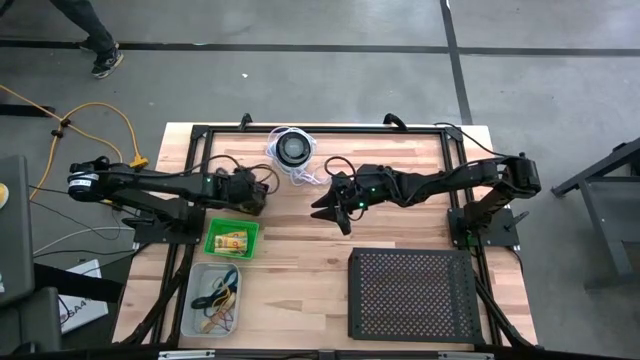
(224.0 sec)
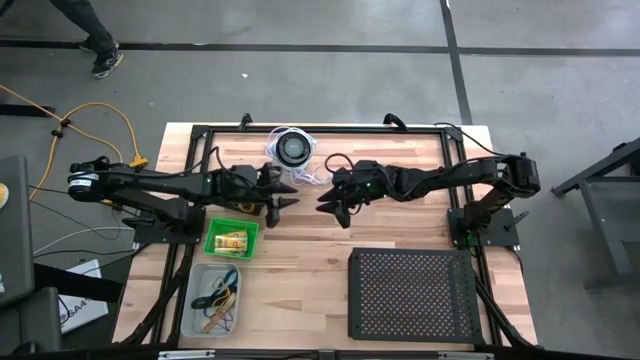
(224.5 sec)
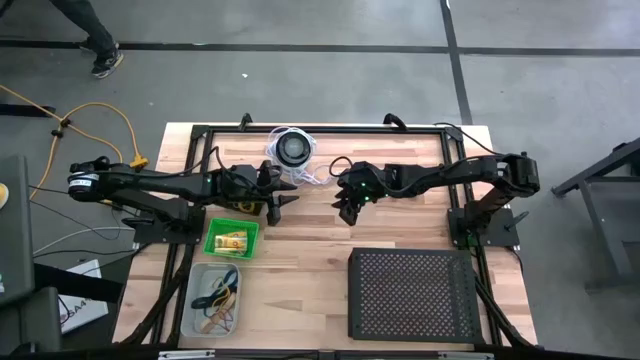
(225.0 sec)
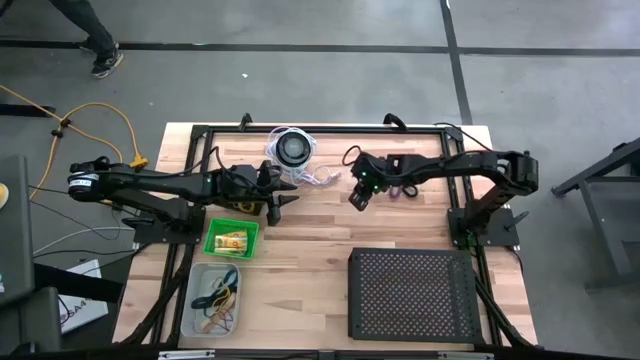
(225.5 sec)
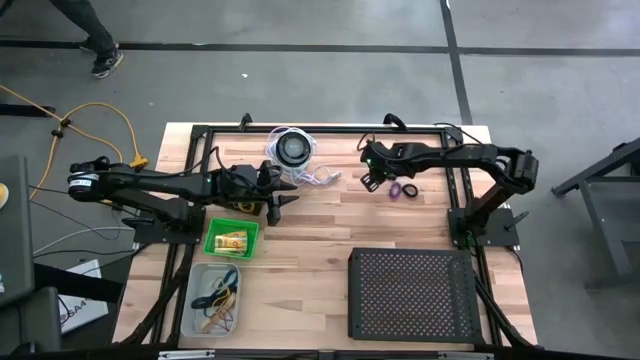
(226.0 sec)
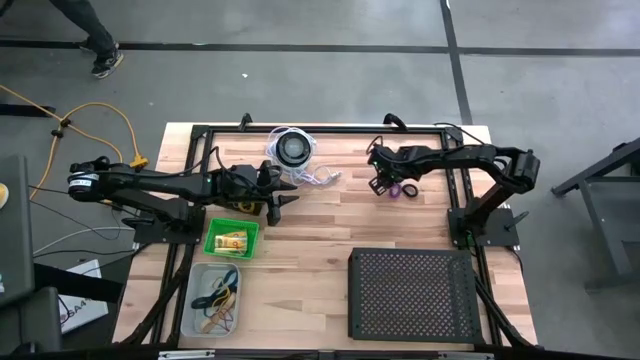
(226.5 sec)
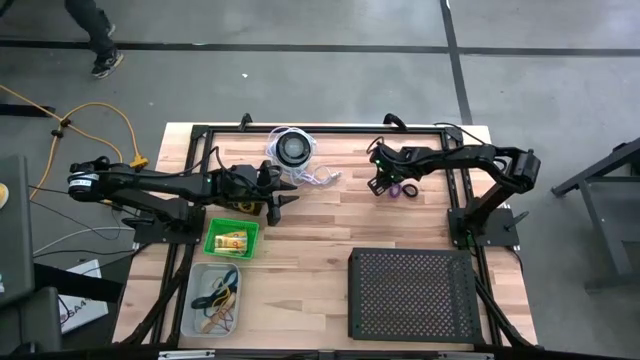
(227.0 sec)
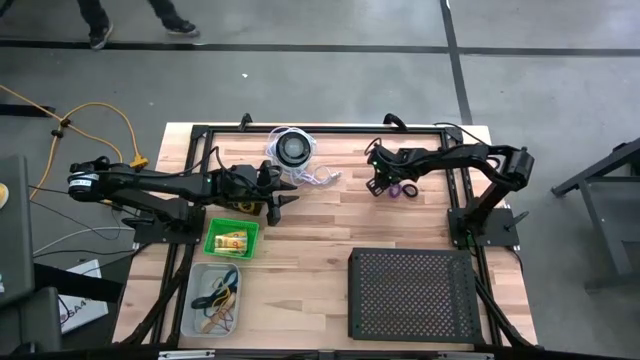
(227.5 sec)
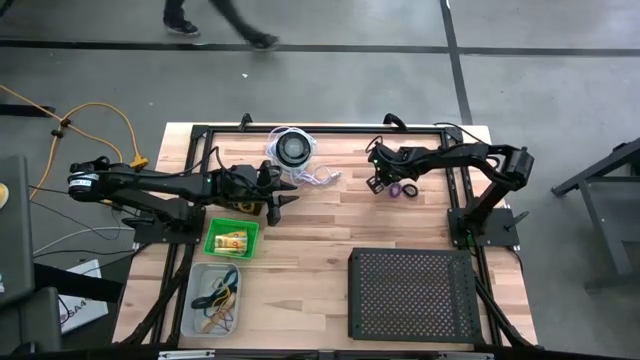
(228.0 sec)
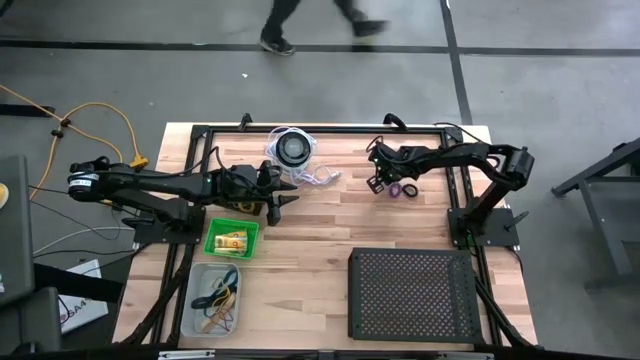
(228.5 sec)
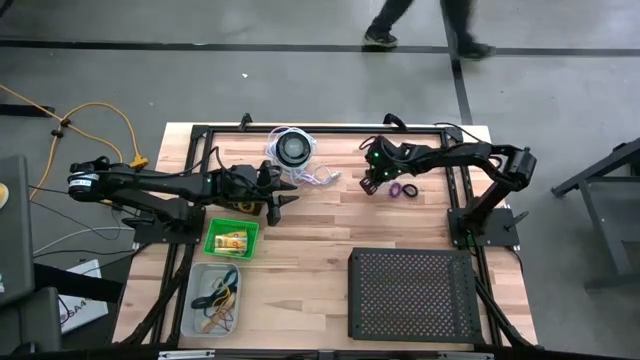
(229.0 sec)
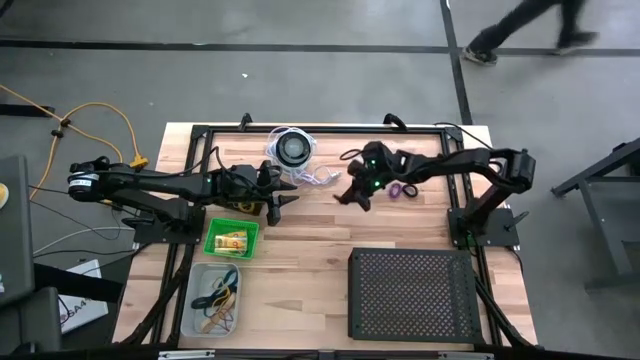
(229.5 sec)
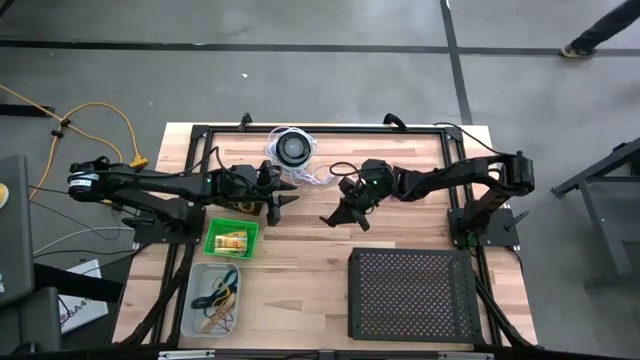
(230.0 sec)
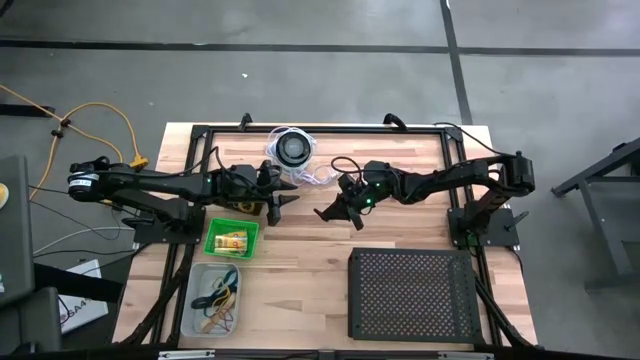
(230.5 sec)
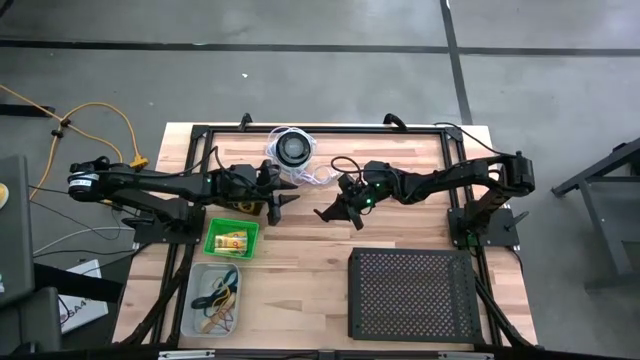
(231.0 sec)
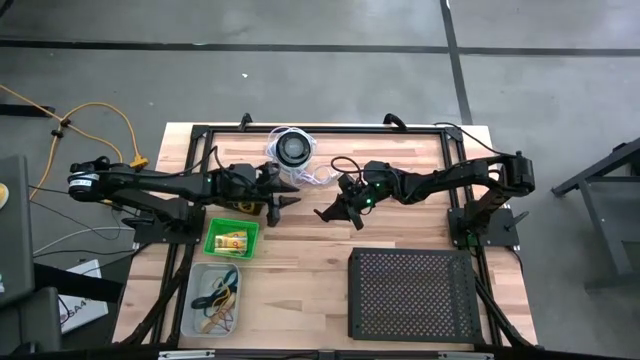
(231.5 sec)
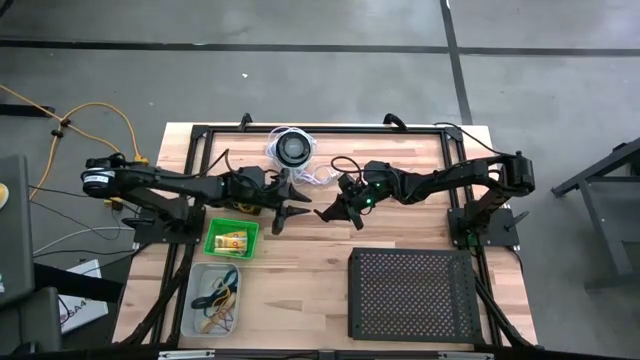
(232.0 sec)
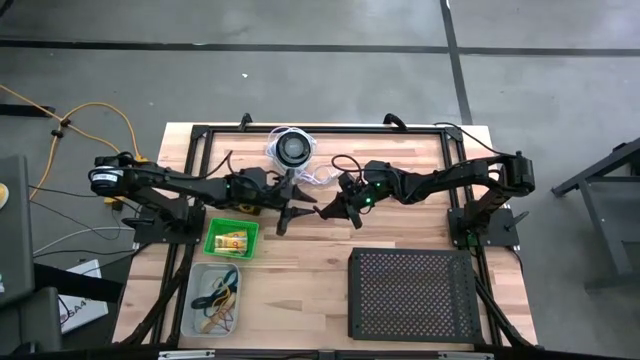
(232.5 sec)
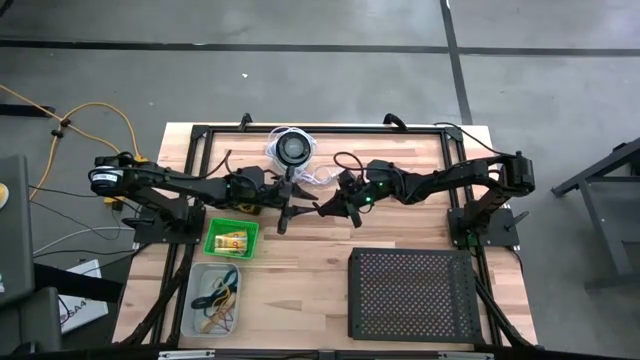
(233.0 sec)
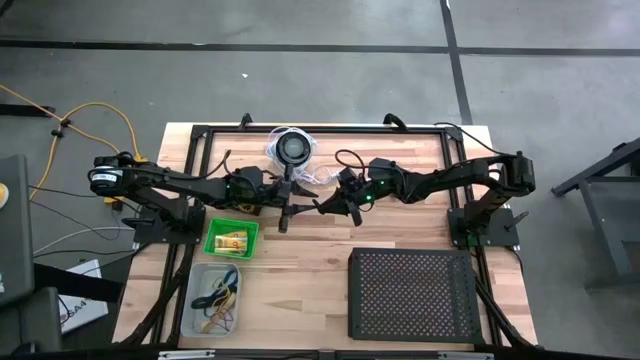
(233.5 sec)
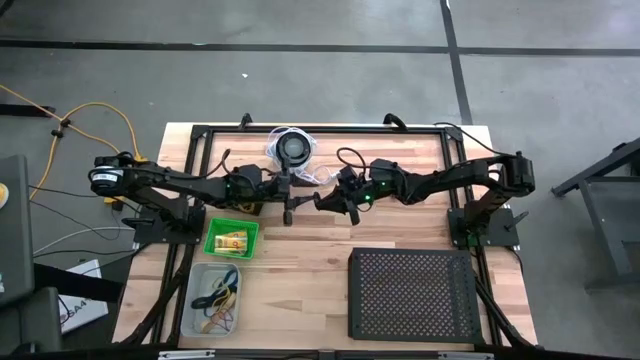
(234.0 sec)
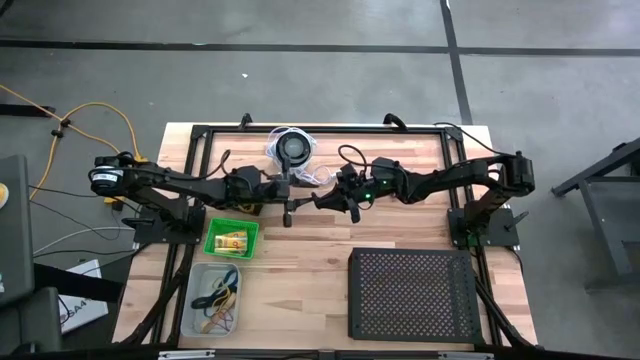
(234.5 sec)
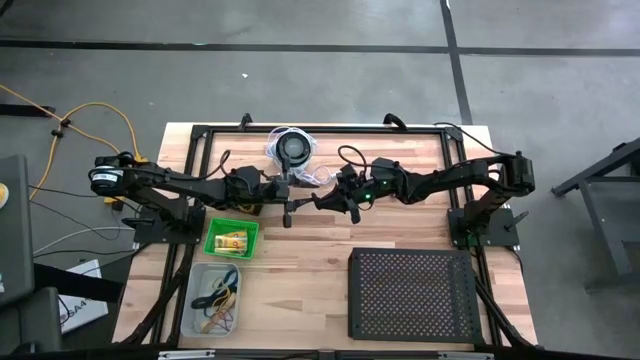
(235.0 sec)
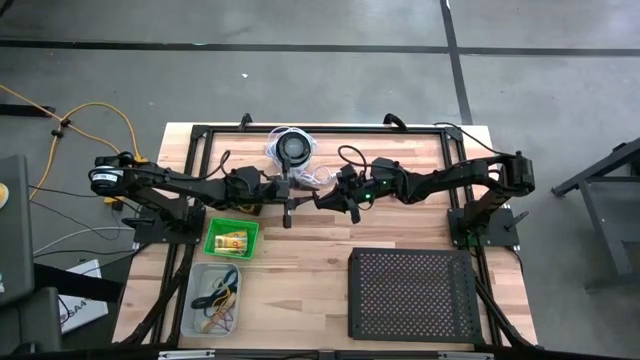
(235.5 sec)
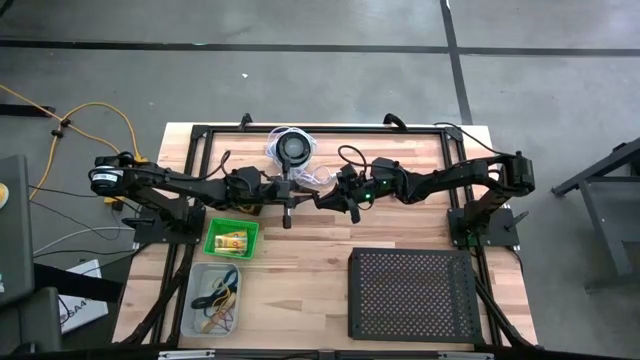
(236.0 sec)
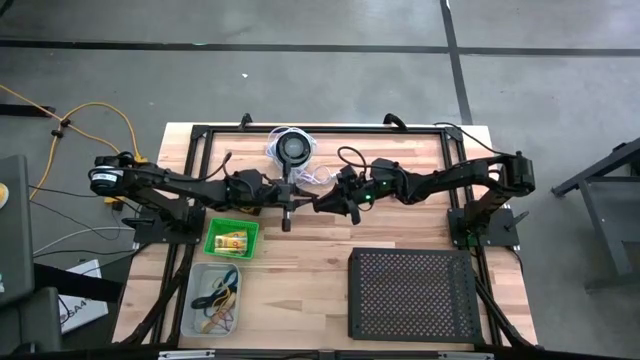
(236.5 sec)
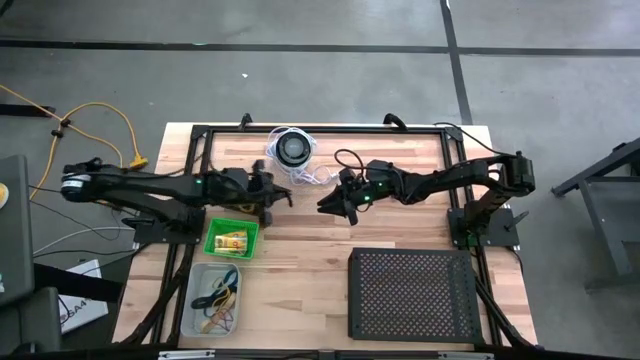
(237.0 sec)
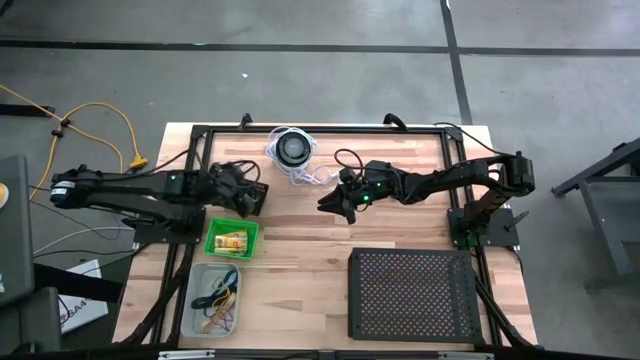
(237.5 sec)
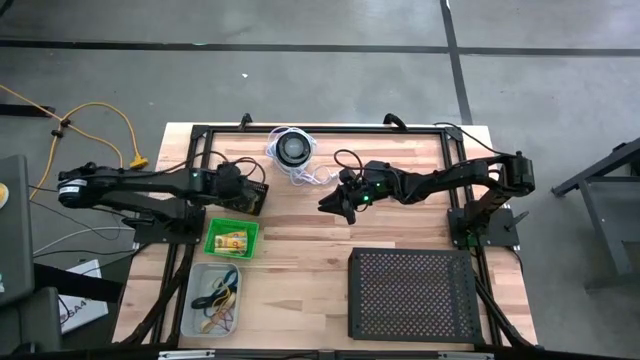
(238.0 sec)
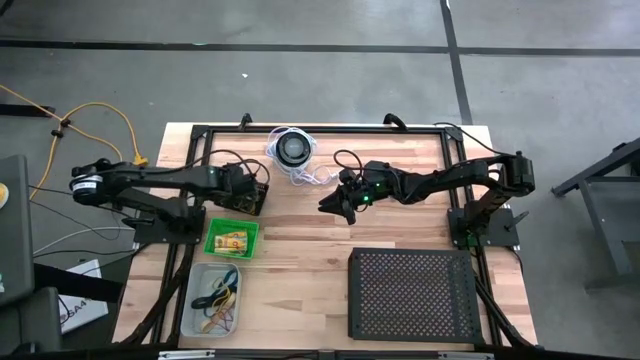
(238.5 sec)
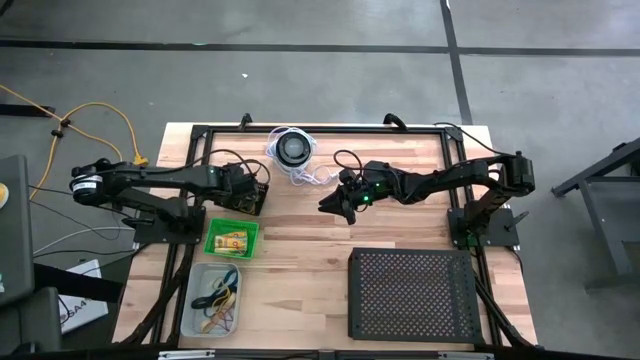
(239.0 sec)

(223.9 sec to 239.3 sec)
Task: Pick & Place Office Desk Supplies
Put the black coil keychain into the black bin

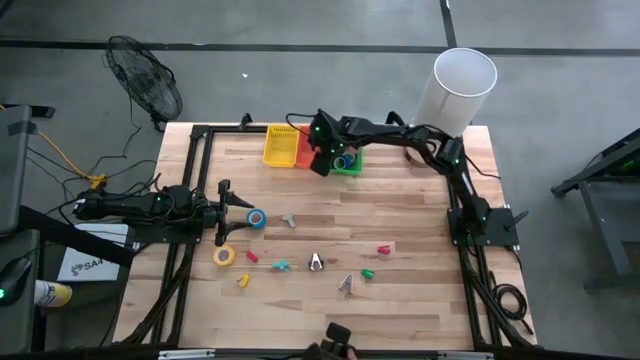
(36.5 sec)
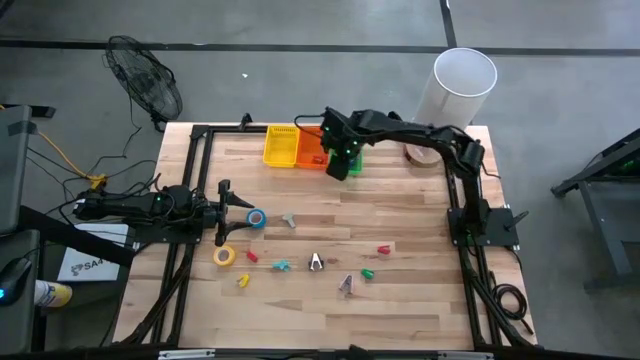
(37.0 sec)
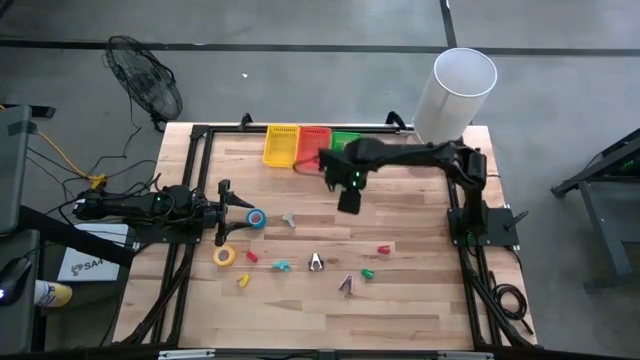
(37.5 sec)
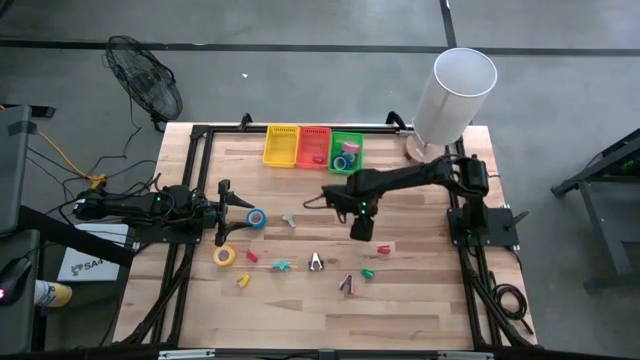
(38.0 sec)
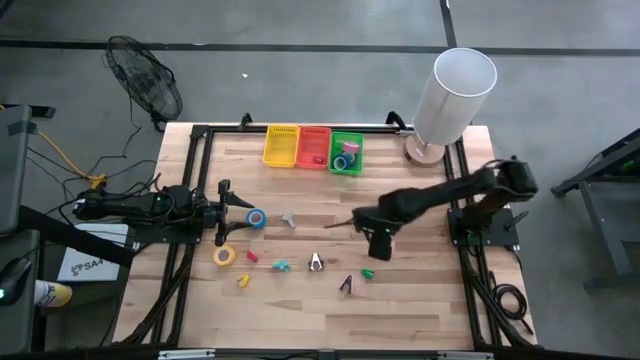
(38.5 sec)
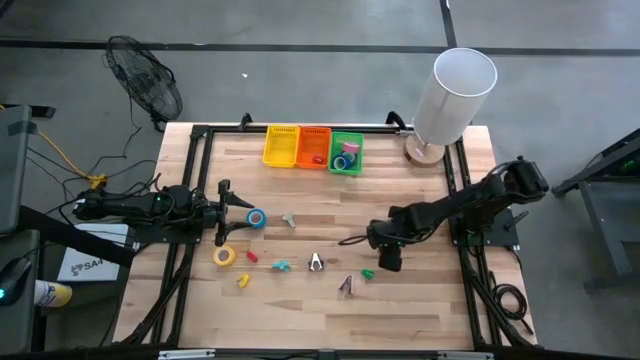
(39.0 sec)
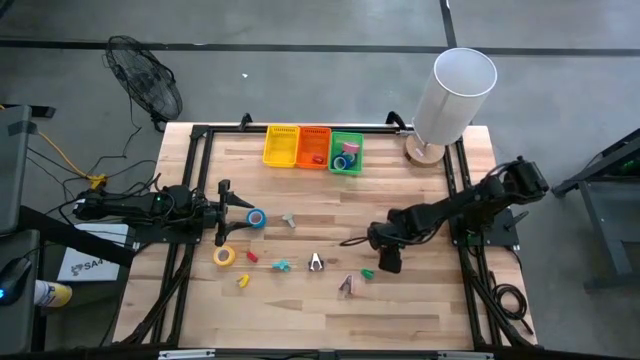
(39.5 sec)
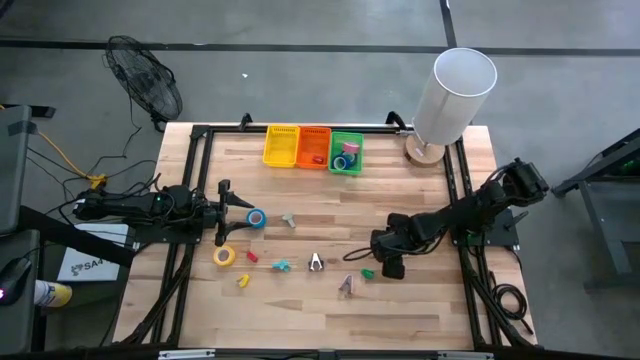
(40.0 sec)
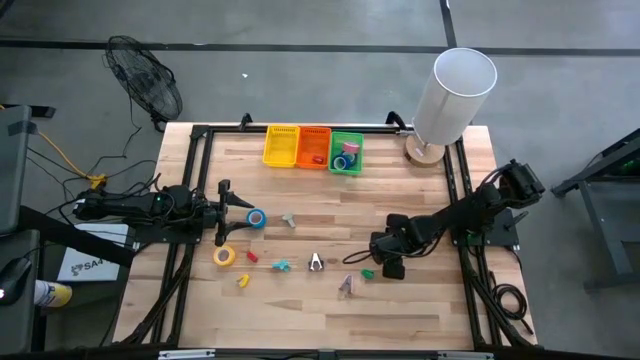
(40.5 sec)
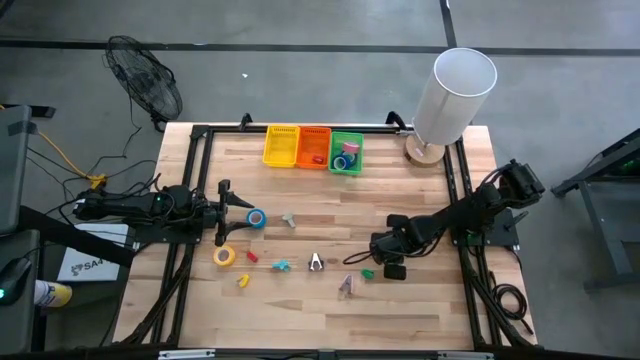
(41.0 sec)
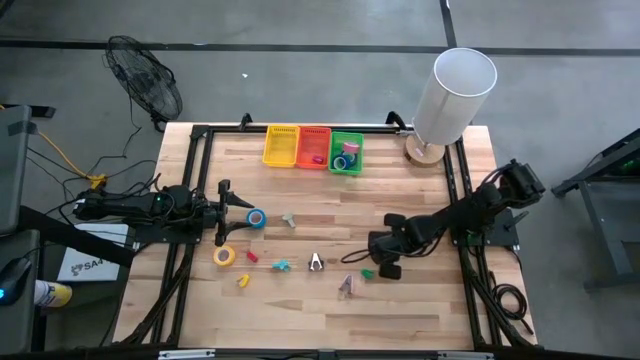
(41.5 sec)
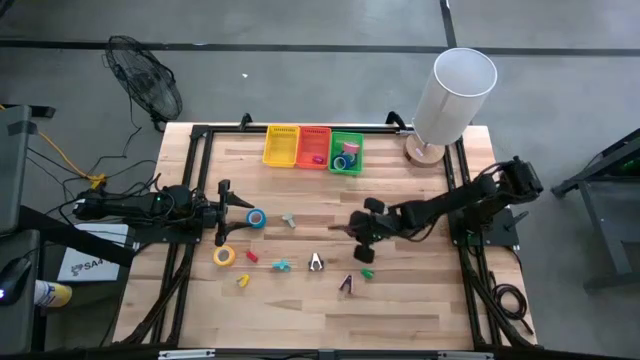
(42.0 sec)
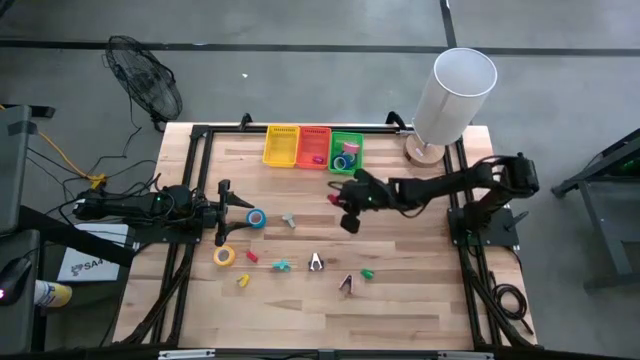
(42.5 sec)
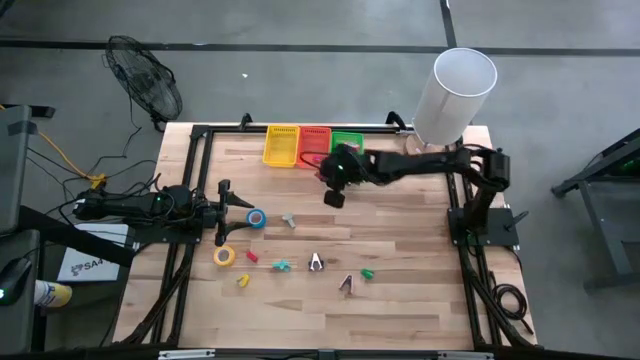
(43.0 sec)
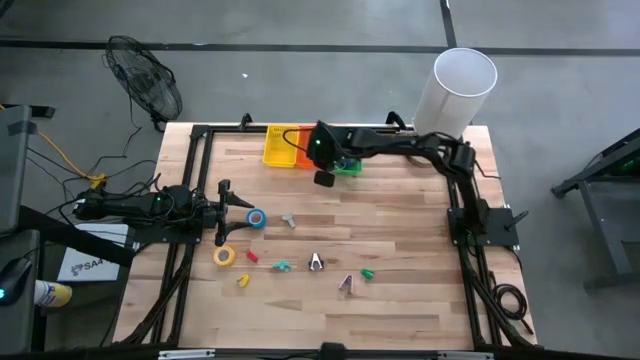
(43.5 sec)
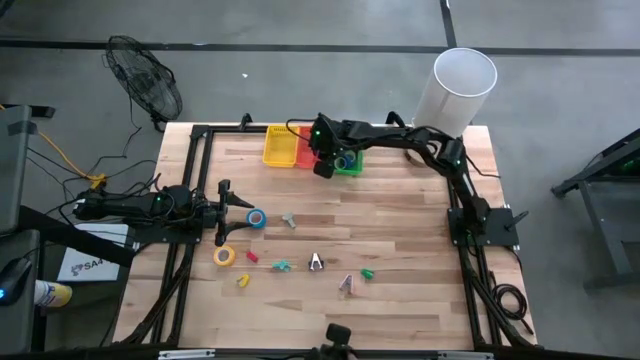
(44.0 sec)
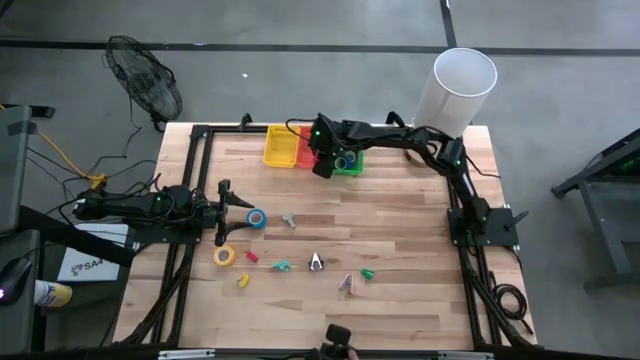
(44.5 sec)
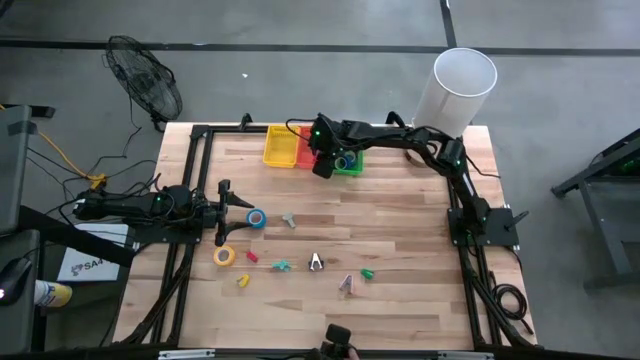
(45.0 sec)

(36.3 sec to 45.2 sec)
Task: Pick and place Stapler, Stapler remover, tape
Put the right red stapler into the orange basket
